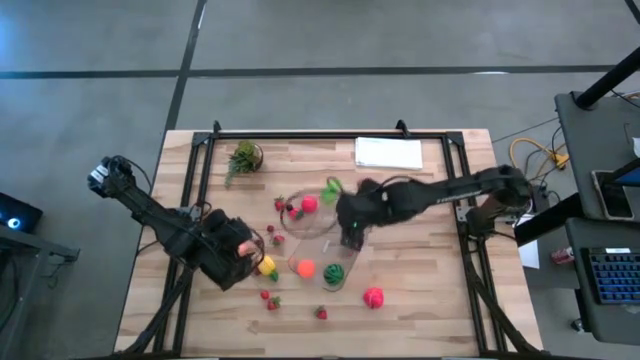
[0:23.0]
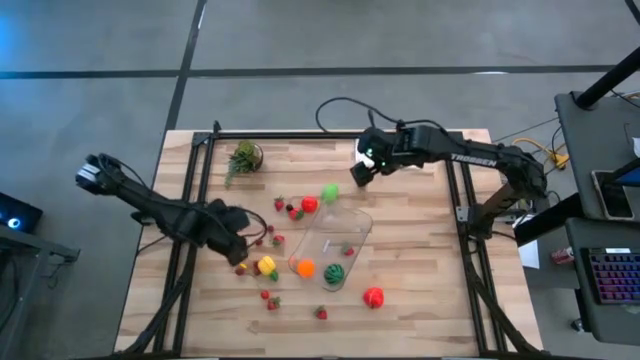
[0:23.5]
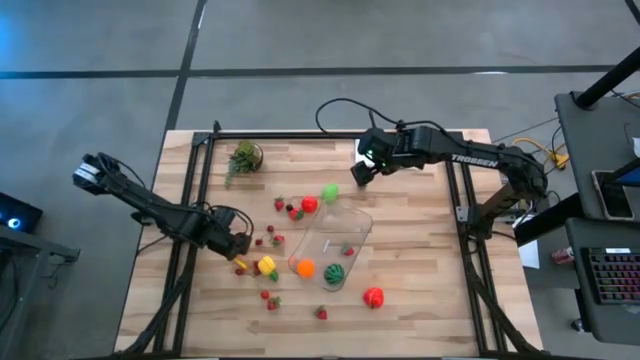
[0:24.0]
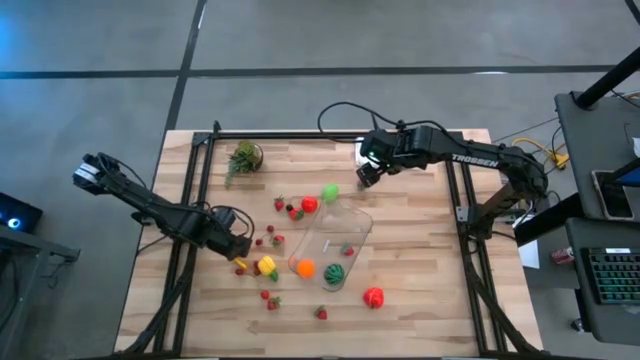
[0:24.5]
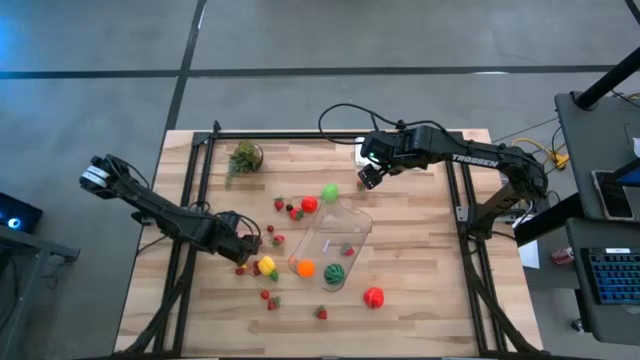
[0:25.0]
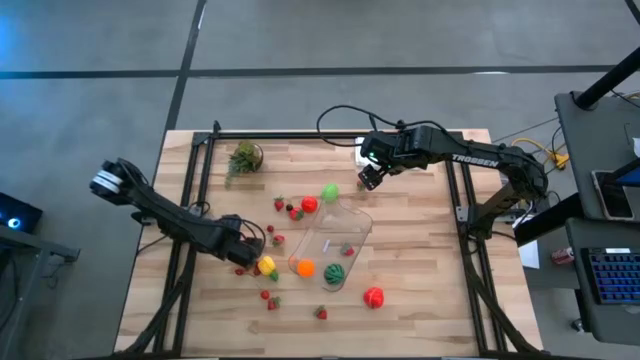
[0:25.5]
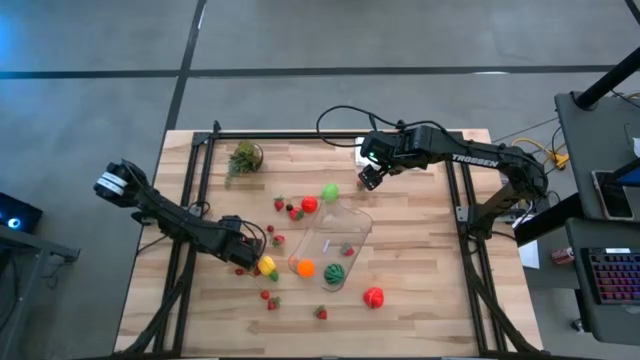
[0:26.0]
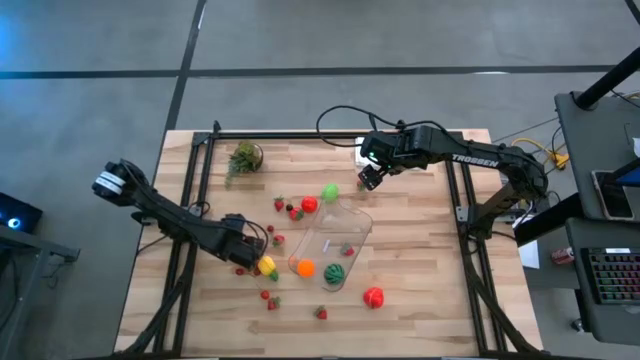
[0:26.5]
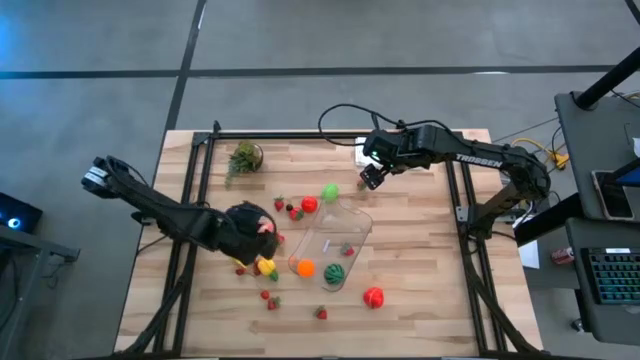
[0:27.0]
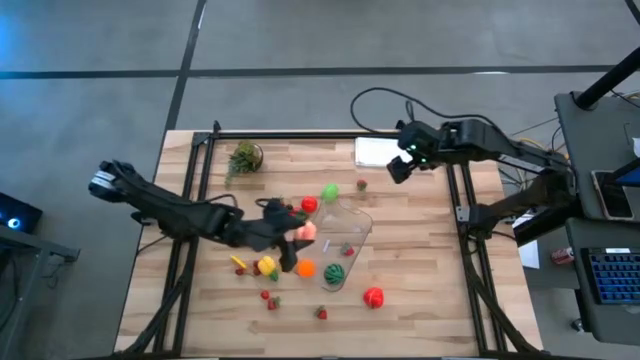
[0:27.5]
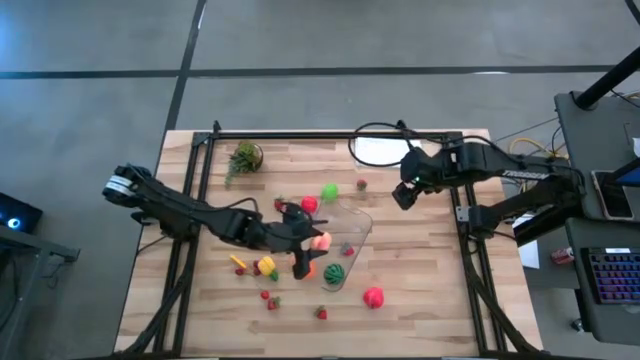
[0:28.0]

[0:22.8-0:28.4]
Task: Pick and placing Produce into tupperware
Put the pink peach into the transparent bin

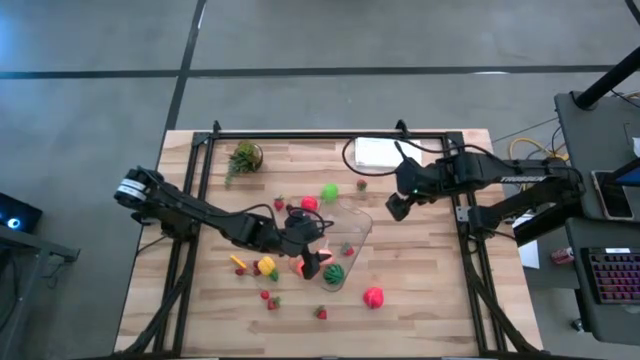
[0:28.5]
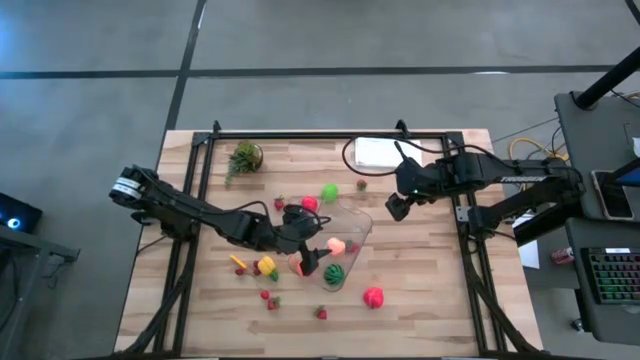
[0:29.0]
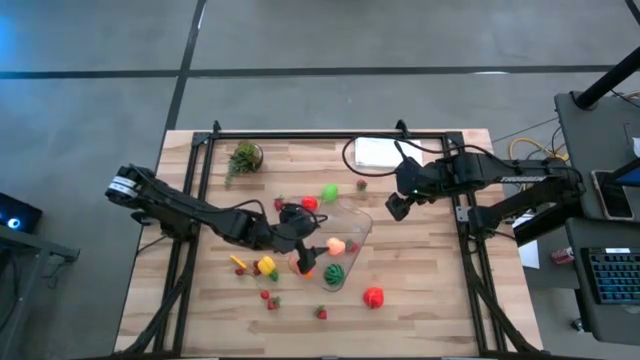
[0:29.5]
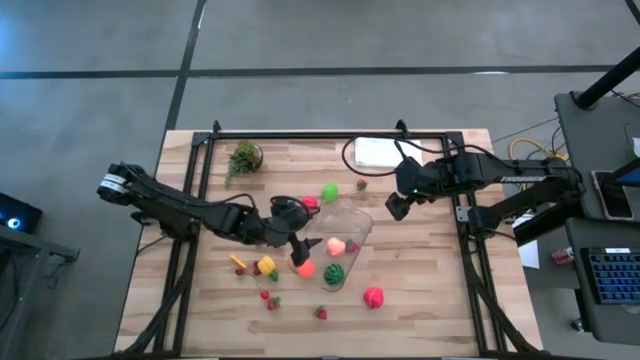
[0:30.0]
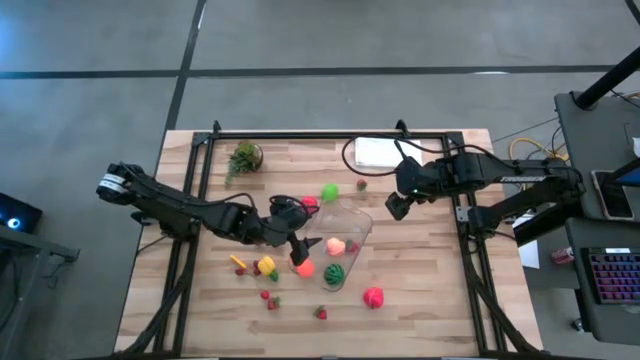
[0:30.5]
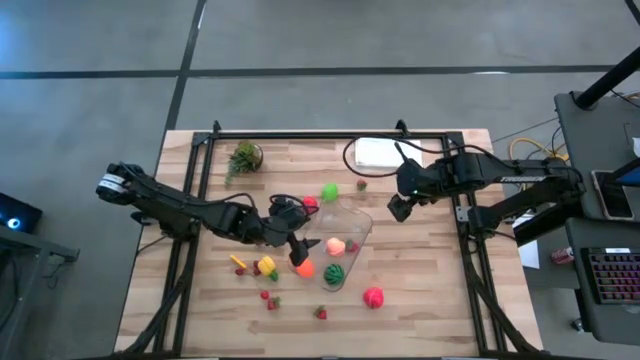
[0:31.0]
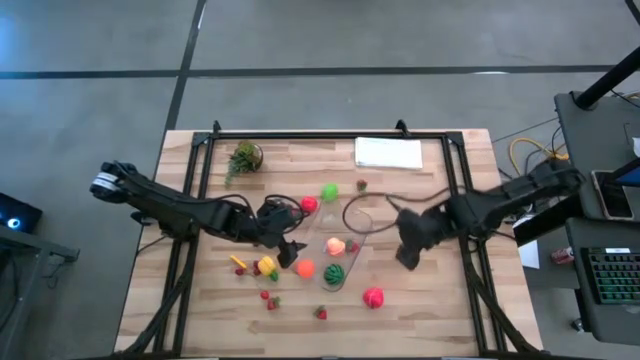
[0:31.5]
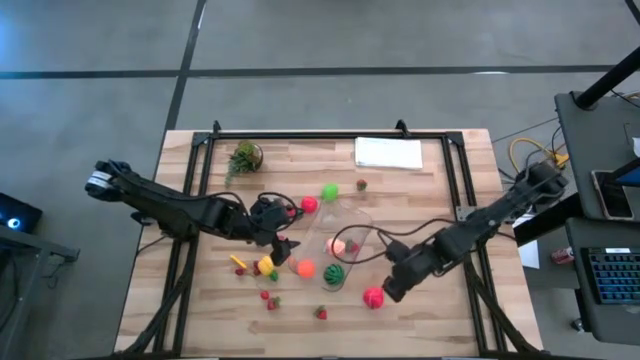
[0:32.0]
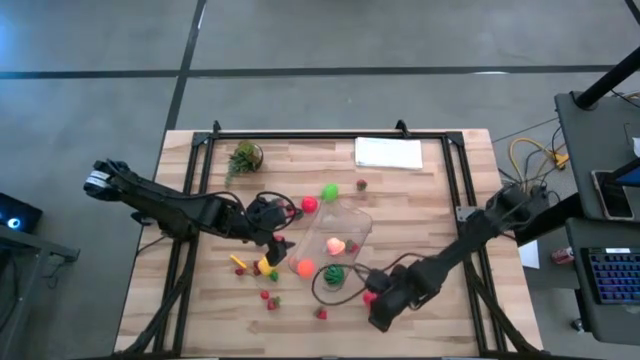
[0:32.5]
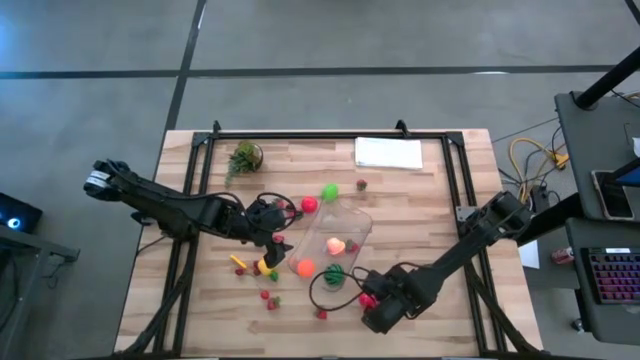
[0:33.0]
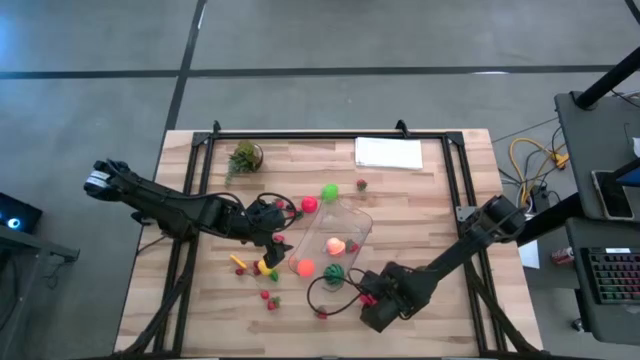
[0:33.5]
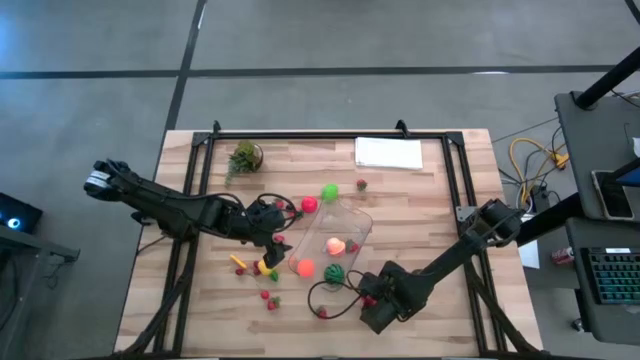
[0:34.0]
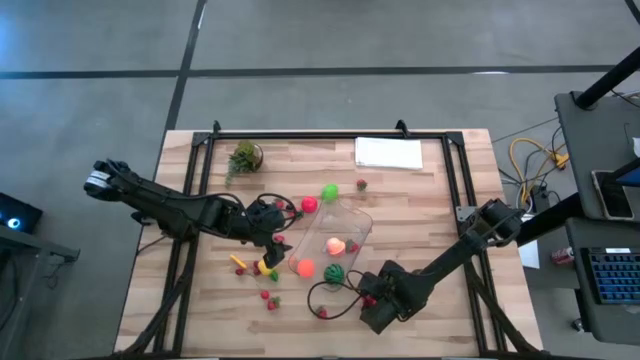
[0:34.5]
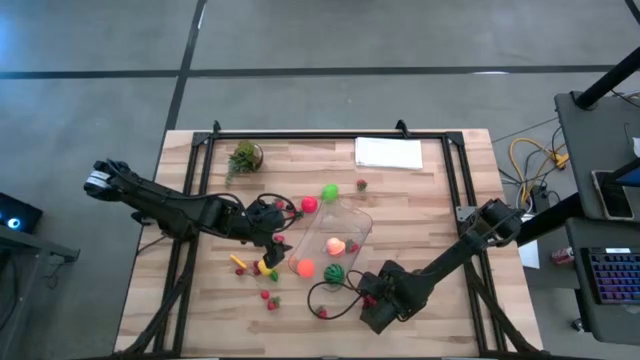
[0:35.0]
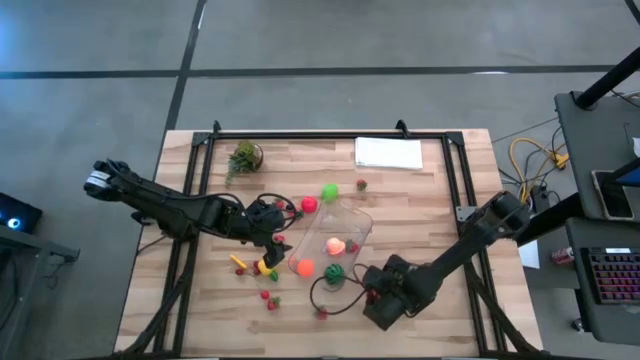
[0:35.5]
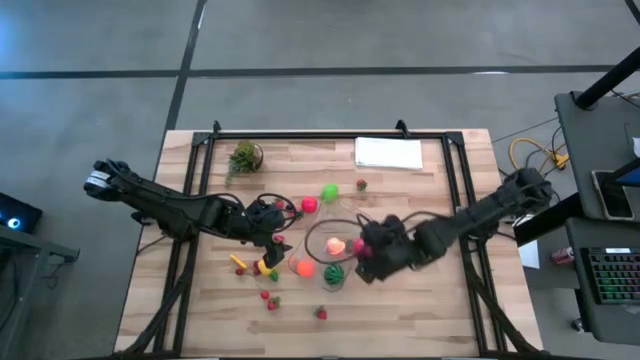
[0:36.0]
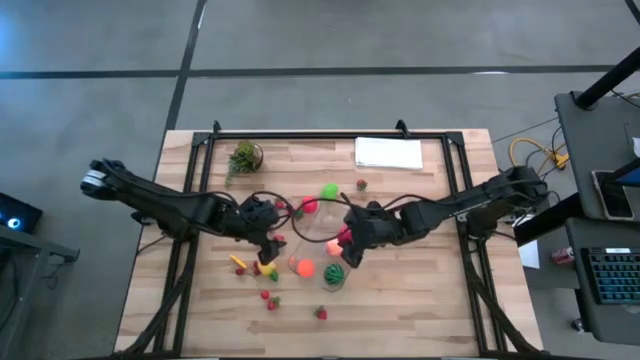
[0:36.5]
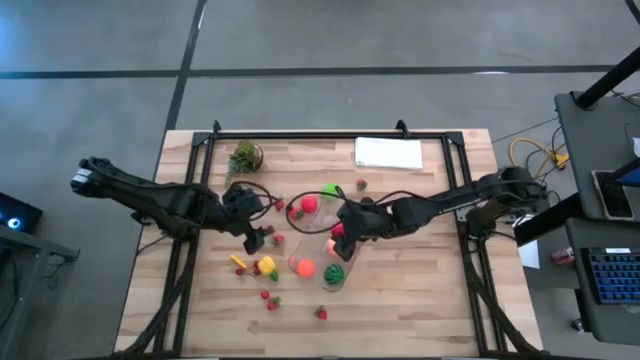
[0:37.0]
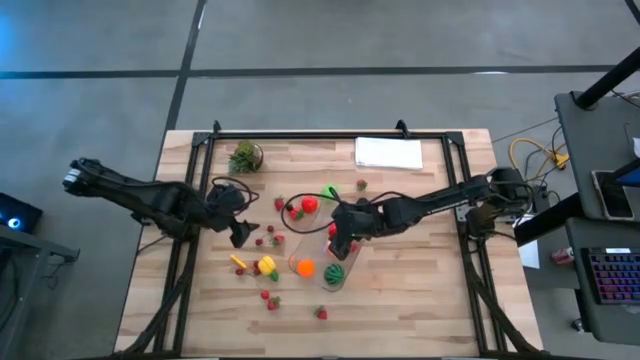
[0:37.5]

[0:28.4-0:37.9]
Put the red apple into the transparent bin

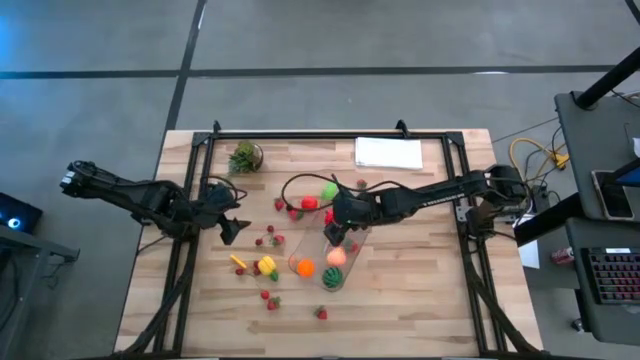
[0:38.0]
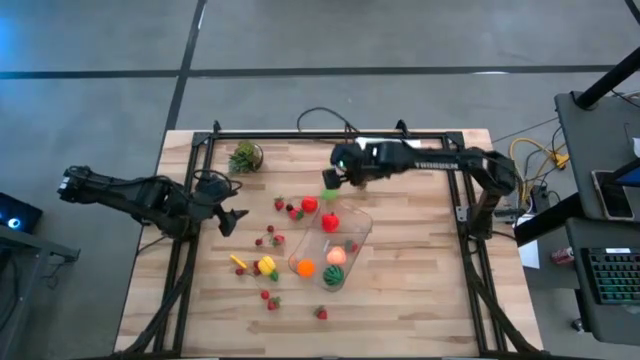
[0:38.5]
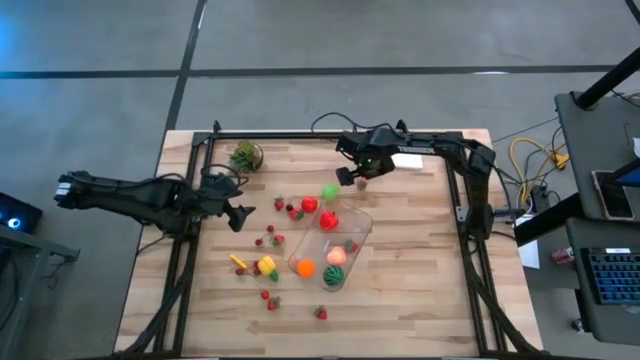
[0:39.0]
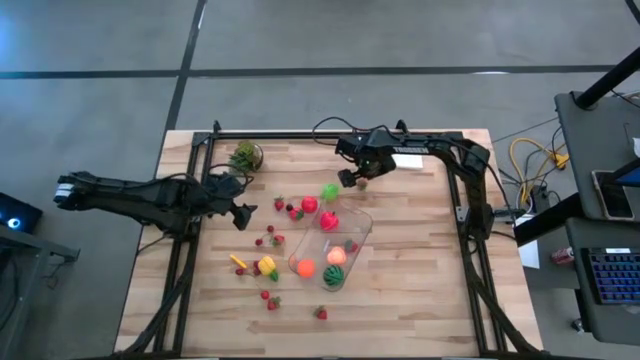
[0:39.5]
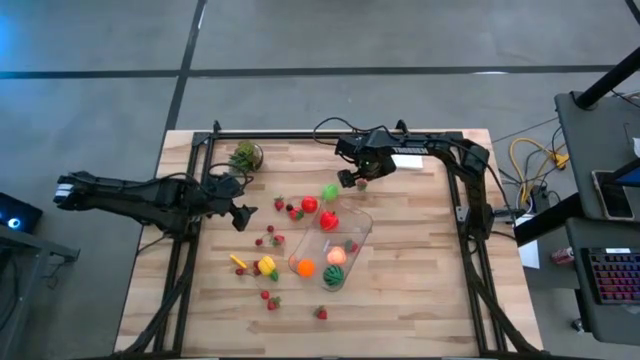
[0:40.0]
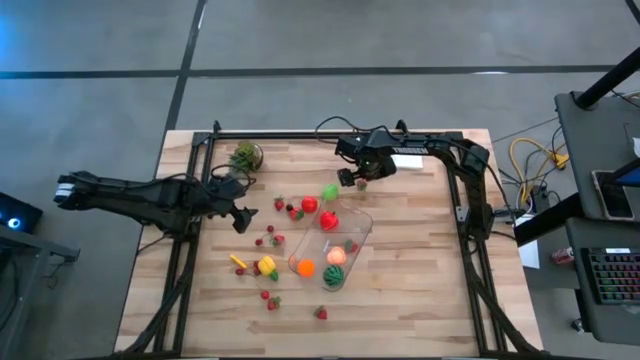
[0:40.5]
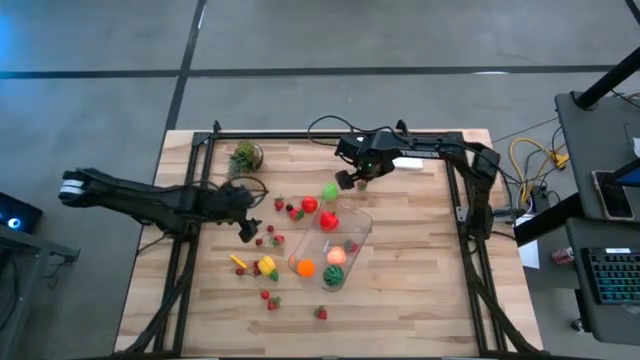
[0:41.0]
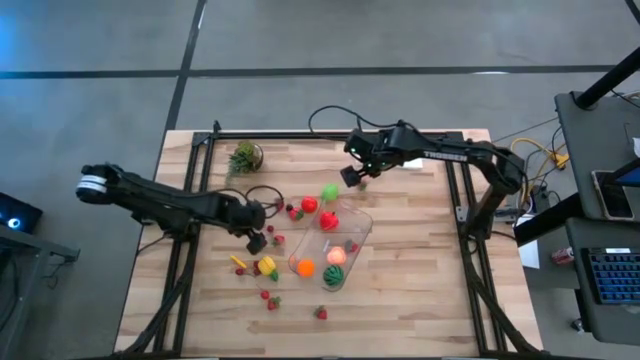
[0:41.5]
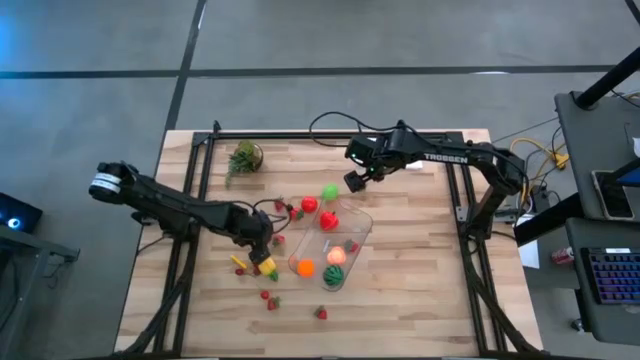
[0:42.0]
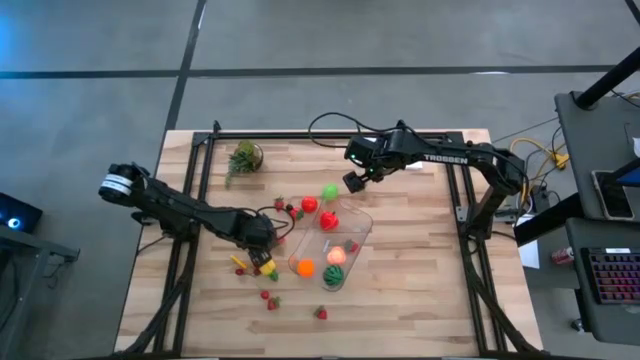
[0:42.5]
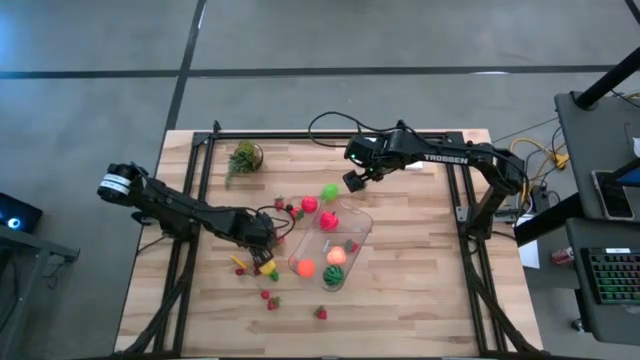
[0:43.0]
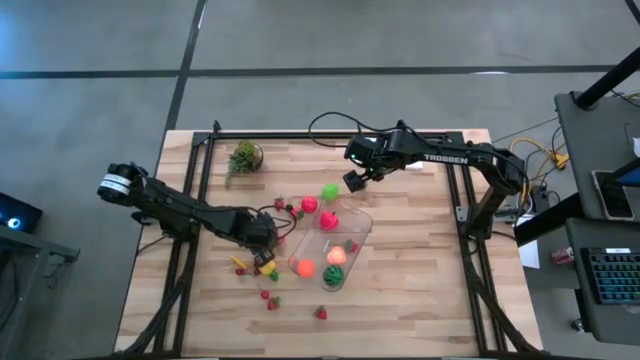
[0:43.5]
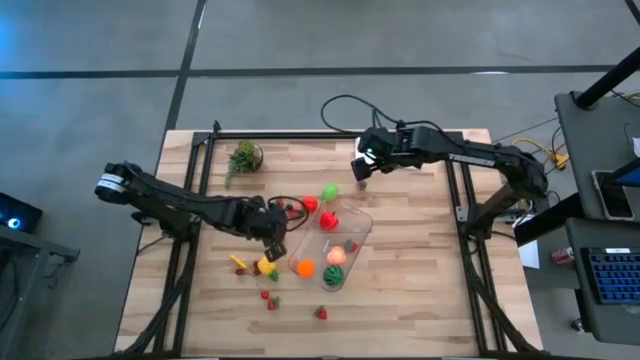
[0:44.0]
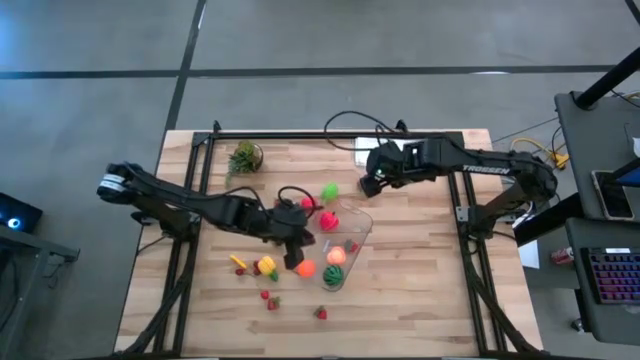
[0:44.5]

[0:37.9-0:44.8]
Put the red cherry into the transparent bin
